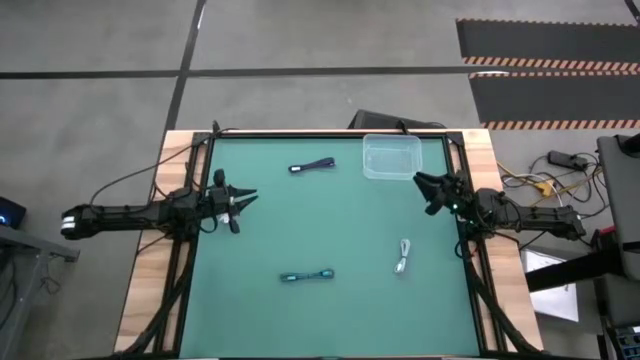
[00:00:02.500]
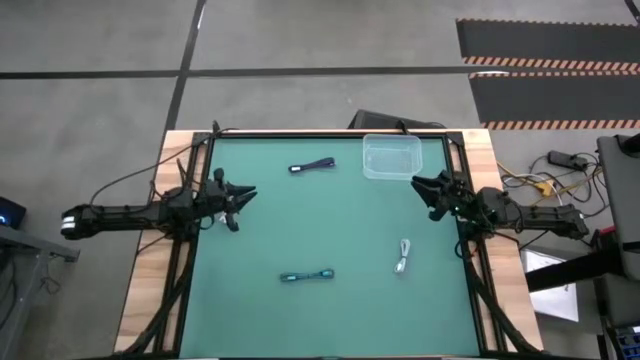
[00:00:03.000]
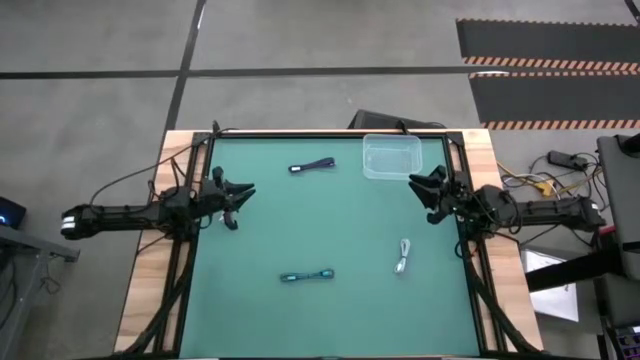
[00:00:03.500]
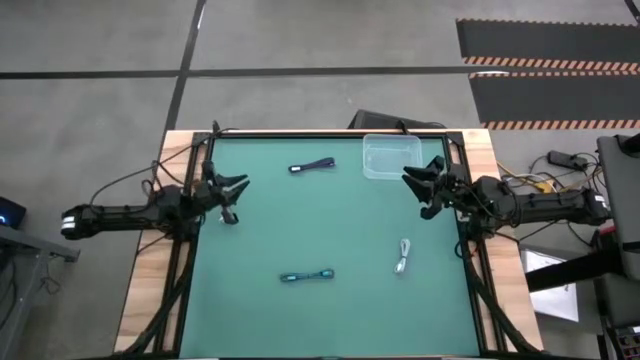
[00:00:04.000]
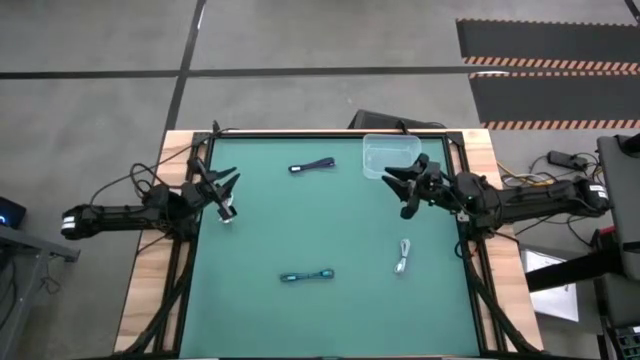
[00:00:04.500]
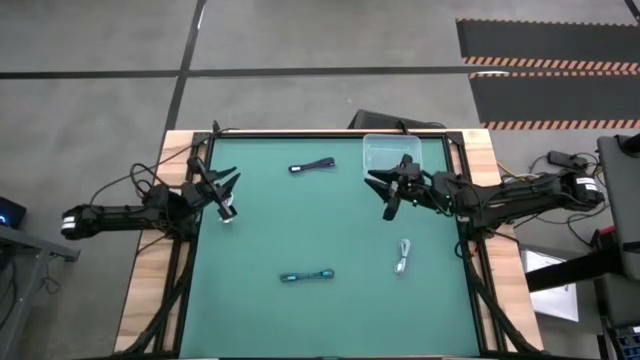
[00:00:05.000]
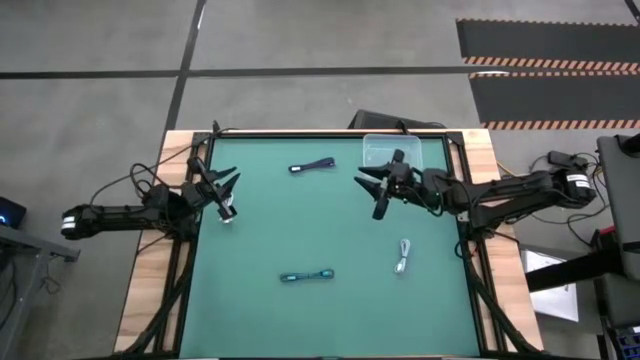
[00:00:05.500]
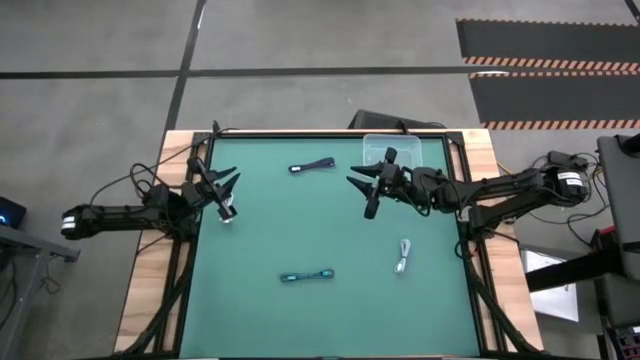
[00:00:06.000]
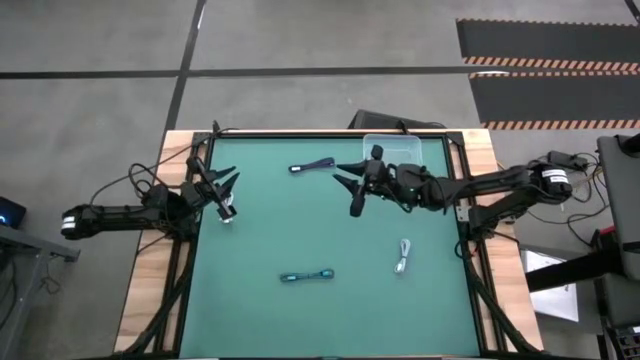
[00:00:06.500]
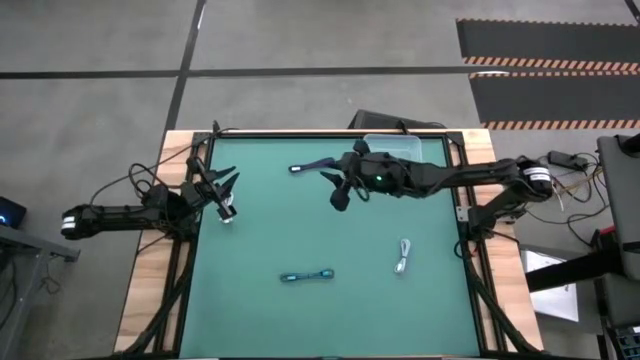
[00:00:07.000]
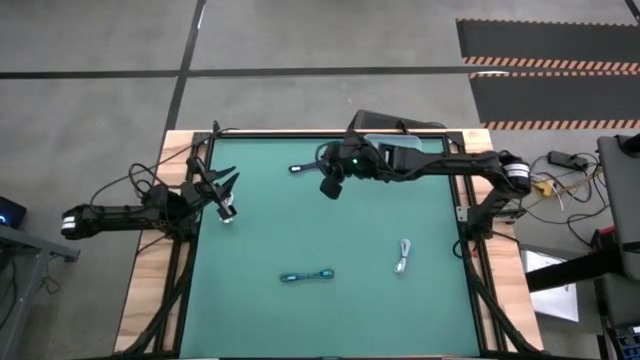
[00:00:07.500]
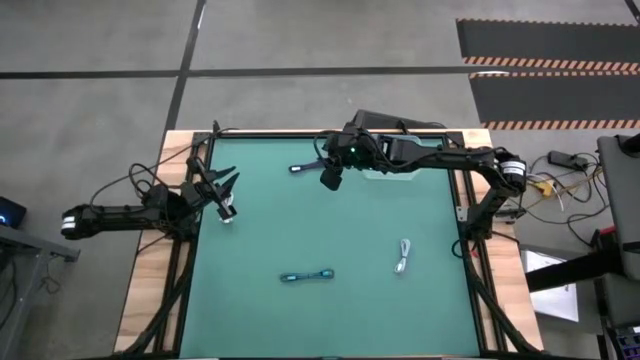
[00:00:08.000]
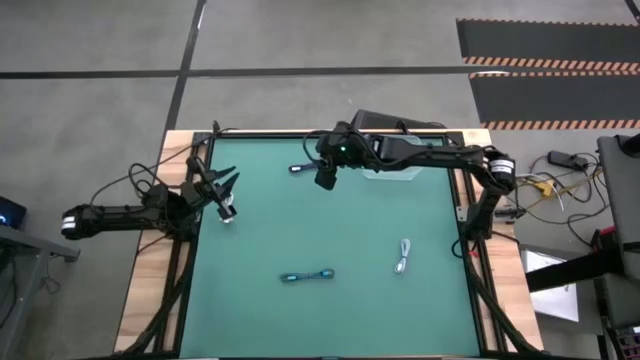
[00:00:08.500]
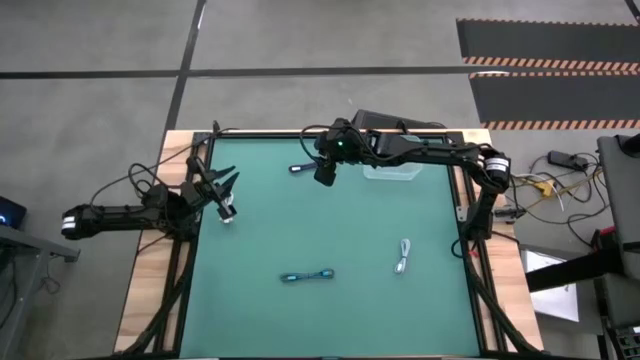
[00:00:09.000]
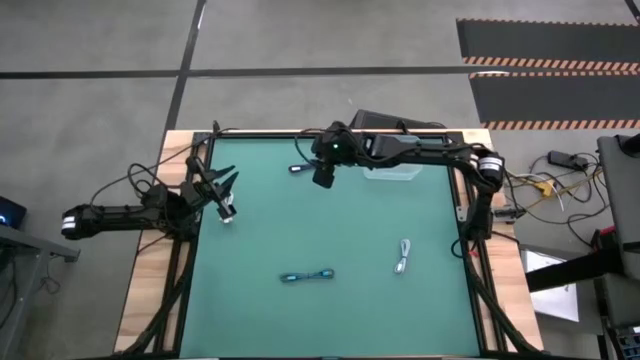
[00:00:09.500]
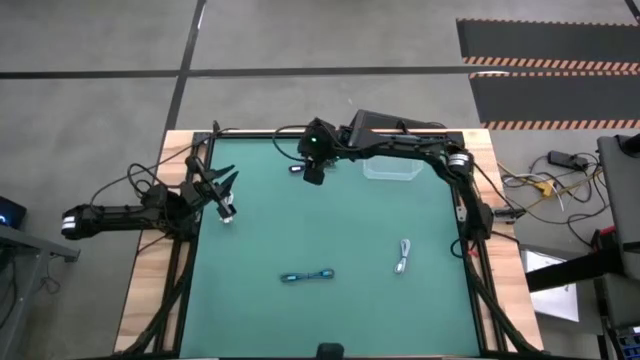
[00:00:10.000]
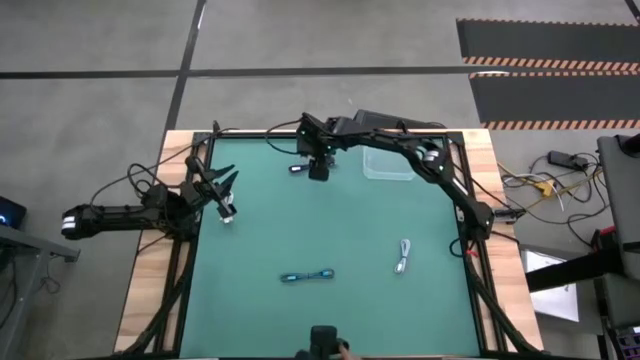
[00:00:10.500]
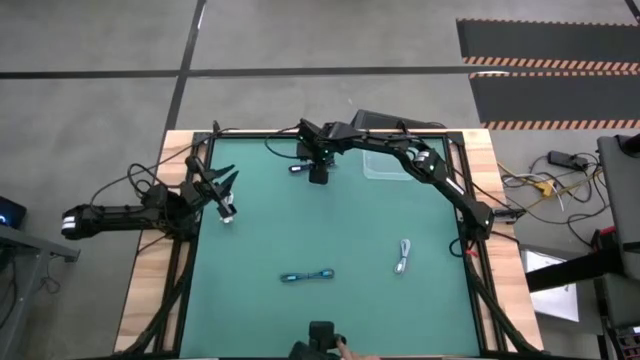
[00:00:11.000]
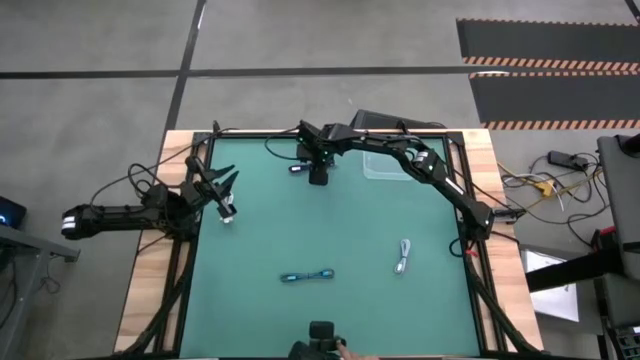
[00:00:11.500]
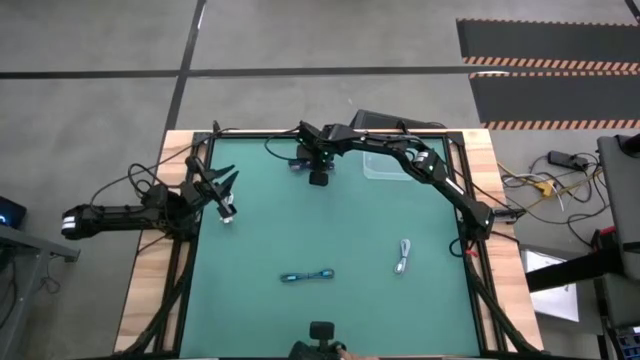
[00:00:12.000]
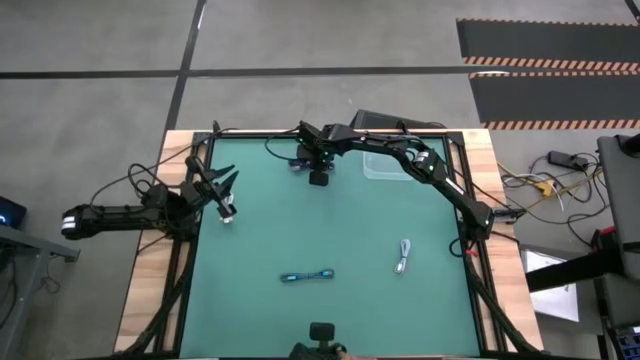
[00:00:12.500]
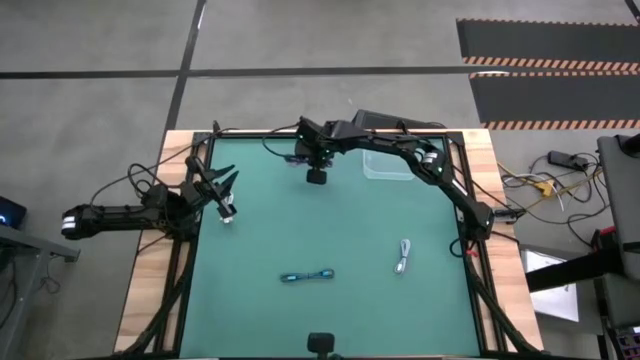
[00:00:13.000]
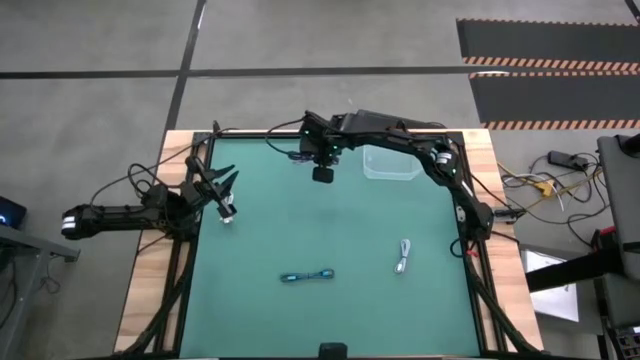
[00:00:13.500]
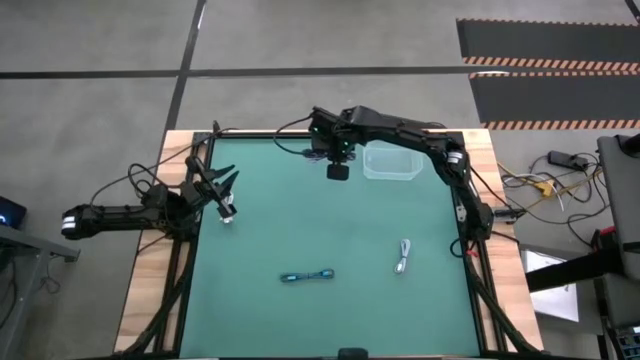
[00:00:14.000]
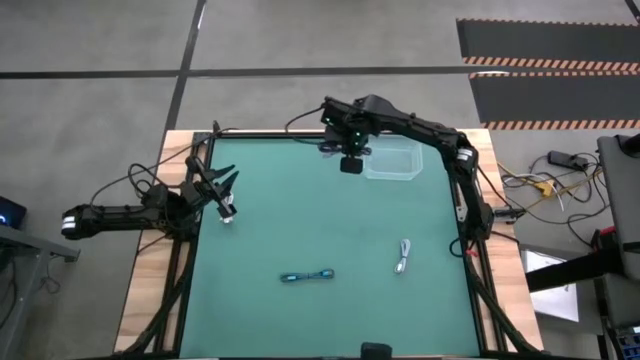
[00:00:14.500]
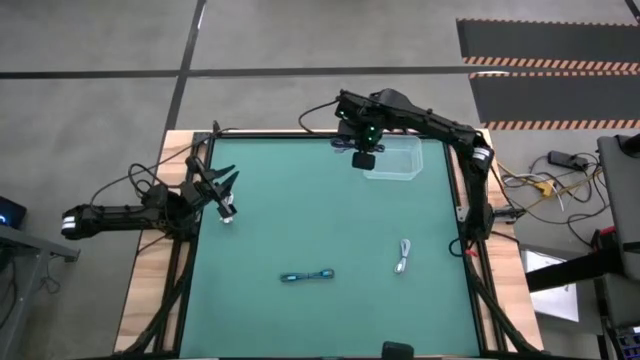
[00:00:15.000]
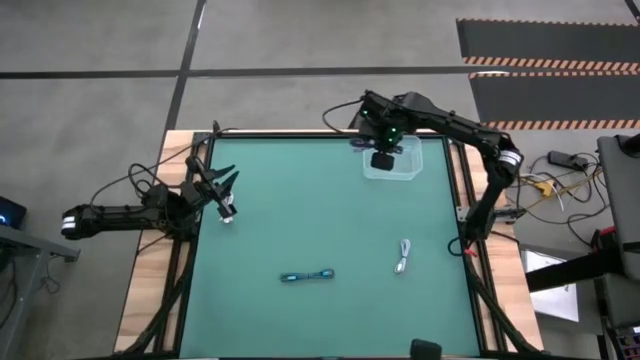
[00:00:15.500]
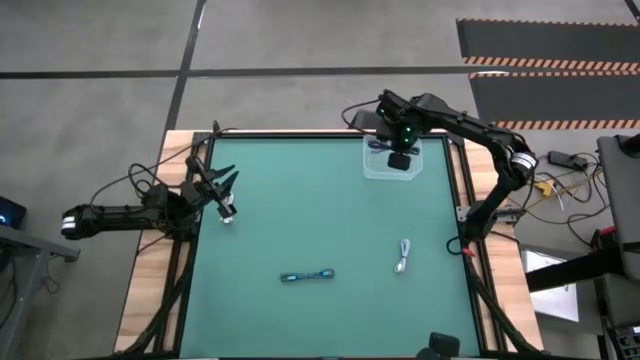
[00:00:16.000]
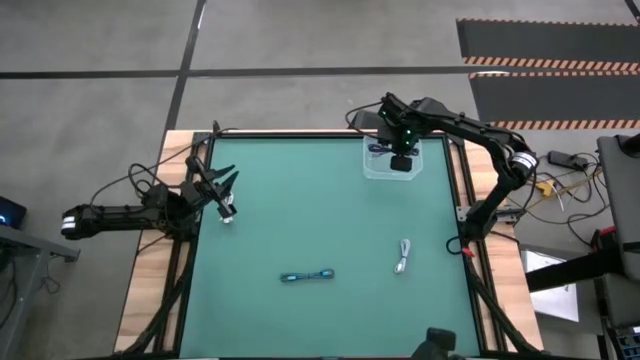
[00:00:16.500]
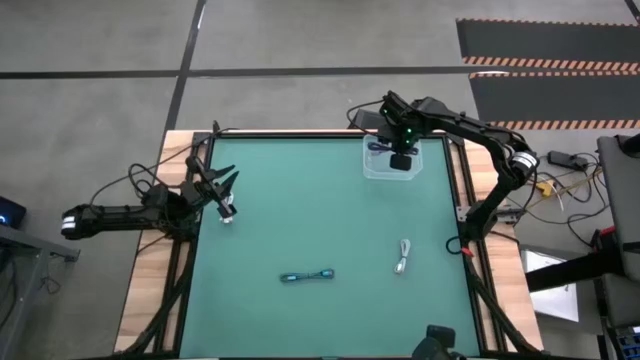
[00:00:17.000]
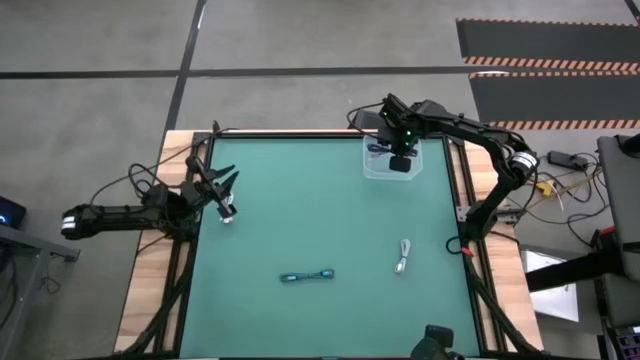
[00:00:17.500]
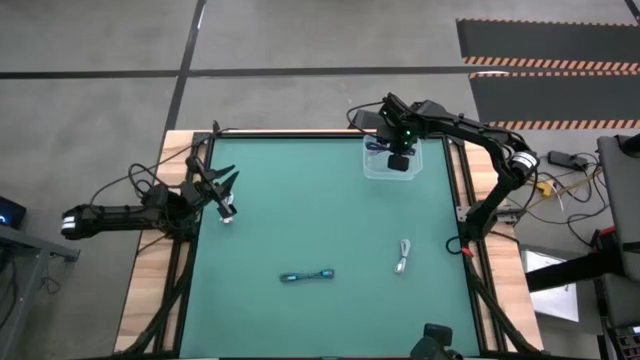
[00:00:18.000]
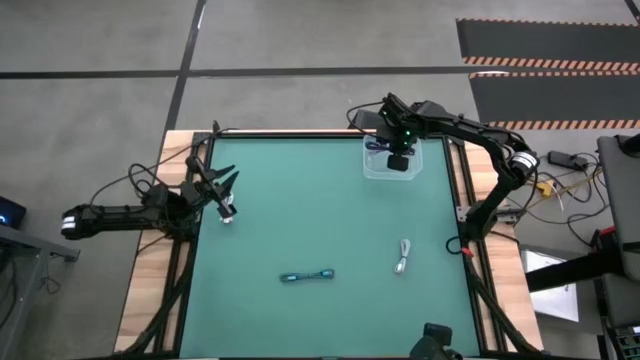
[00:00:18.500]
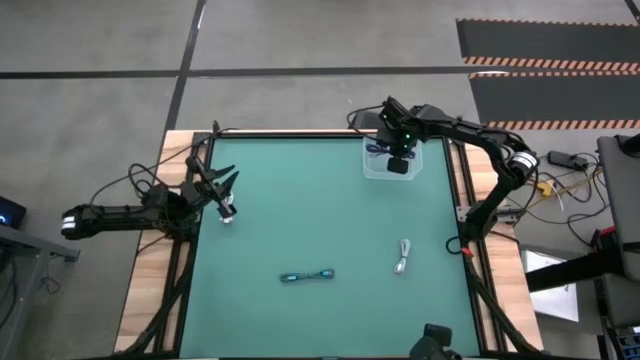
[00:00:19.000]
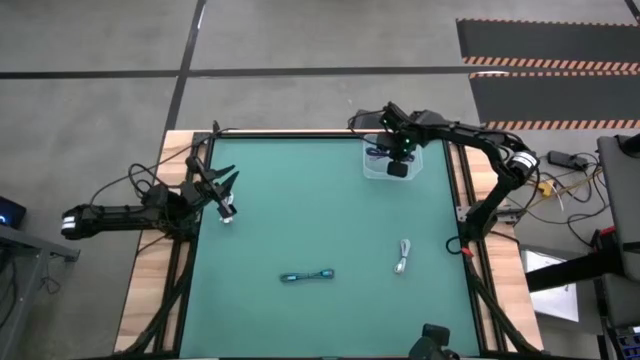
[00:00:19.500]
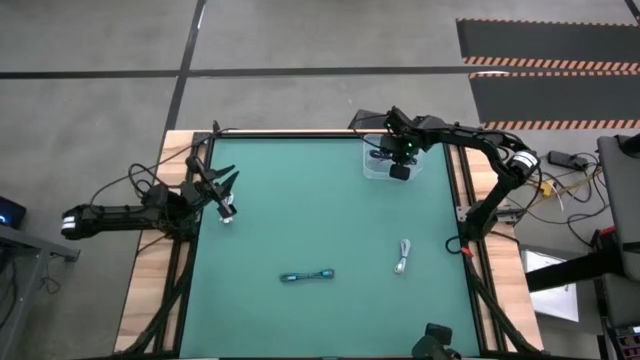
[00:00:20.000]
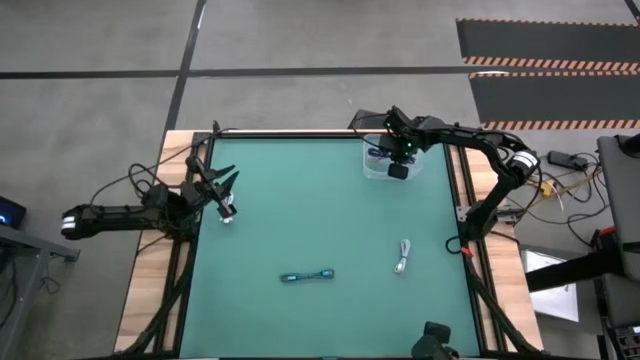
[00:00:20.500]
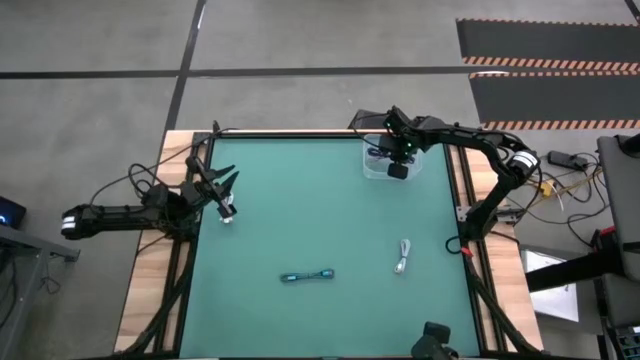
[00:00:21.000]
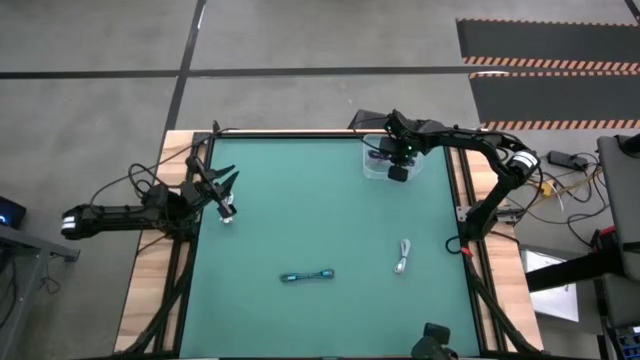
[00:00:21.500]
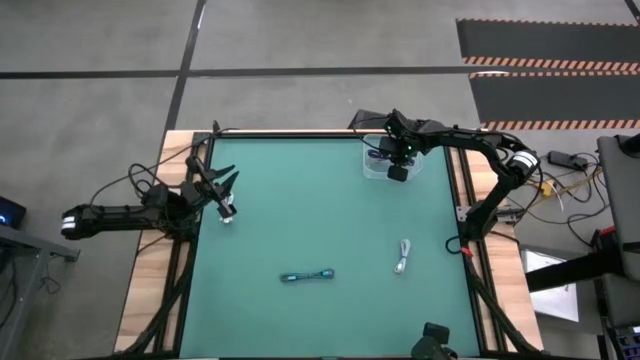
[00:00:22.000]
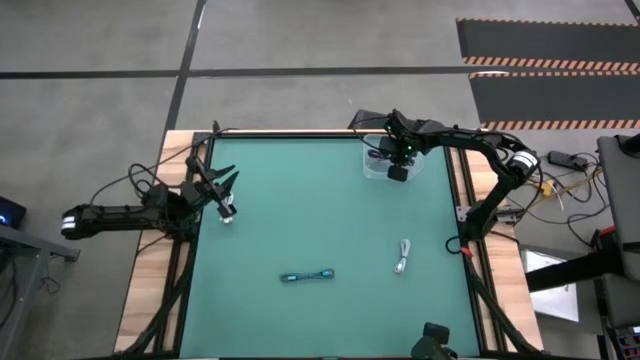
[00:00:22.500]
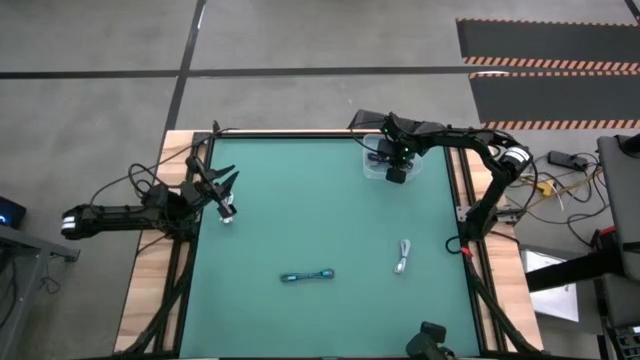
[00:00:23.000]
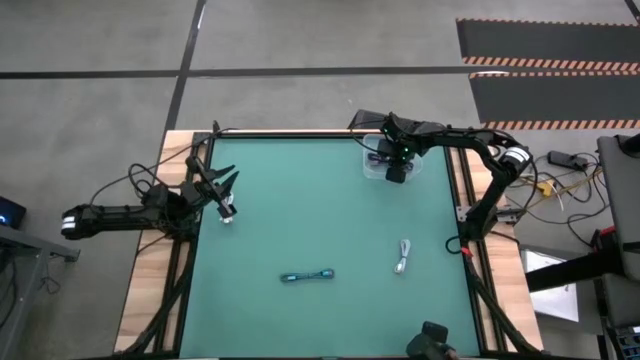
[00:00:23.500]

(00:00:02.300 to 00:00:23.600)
Task: Pick and place USB-C Cables
Put the violet charger cable into the transparent bin
